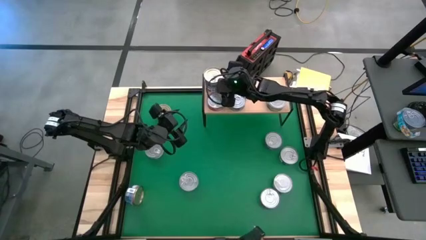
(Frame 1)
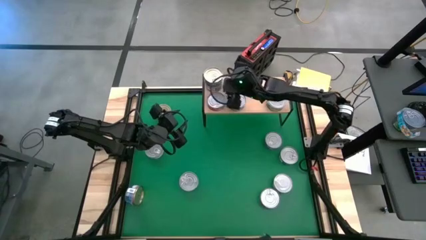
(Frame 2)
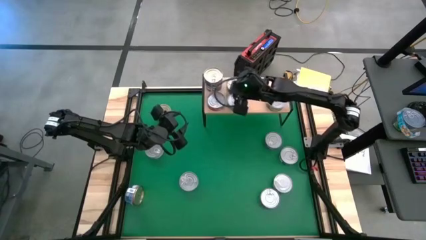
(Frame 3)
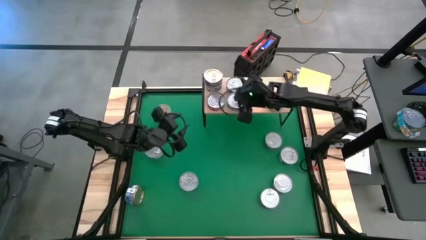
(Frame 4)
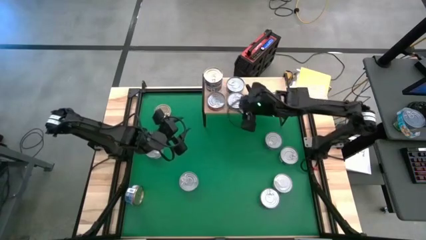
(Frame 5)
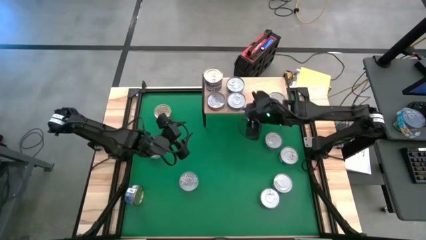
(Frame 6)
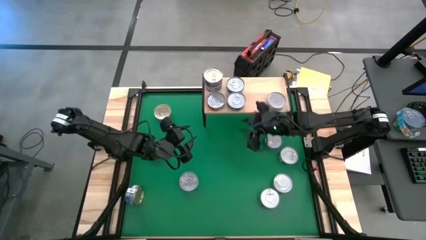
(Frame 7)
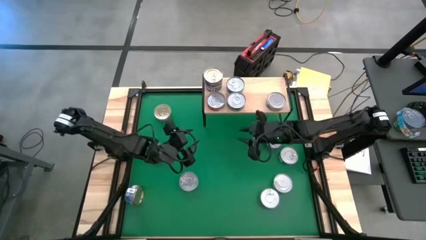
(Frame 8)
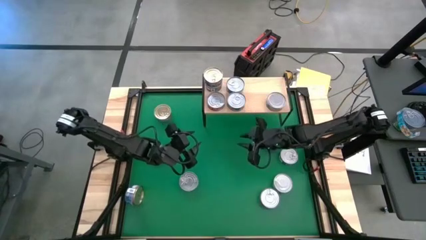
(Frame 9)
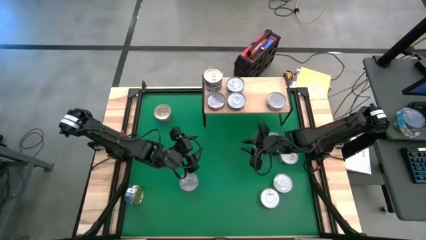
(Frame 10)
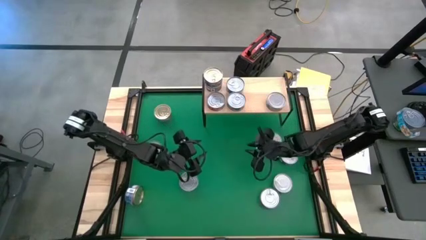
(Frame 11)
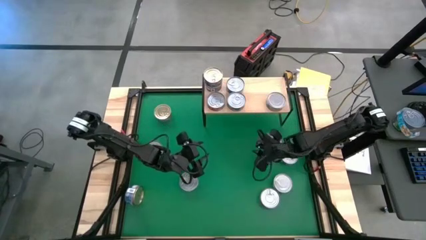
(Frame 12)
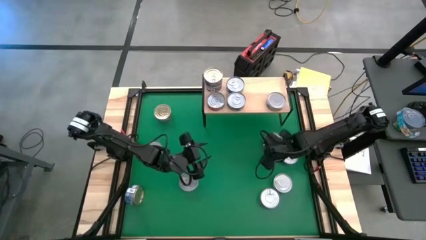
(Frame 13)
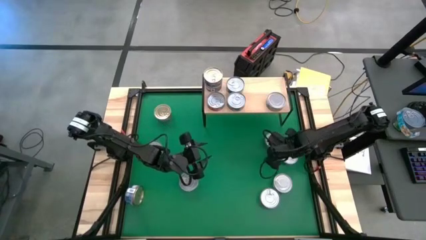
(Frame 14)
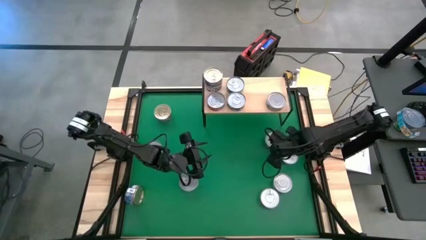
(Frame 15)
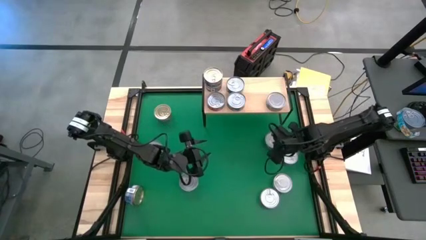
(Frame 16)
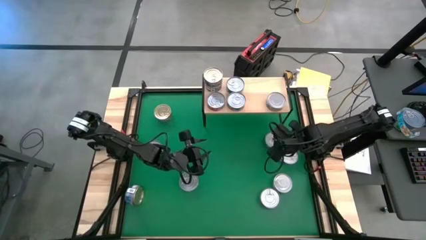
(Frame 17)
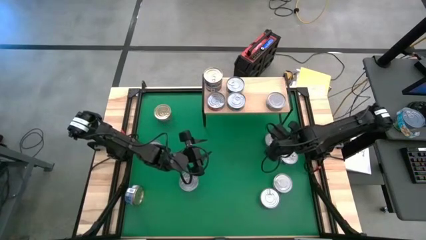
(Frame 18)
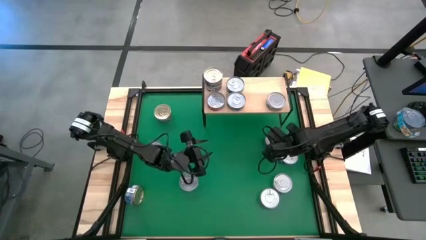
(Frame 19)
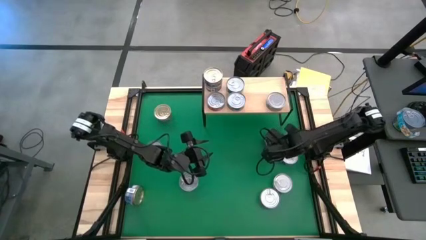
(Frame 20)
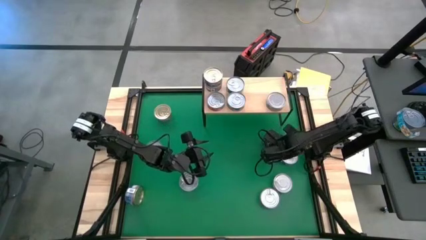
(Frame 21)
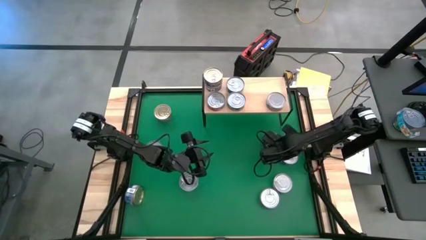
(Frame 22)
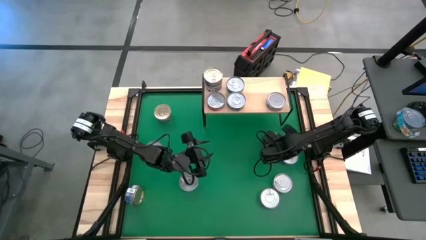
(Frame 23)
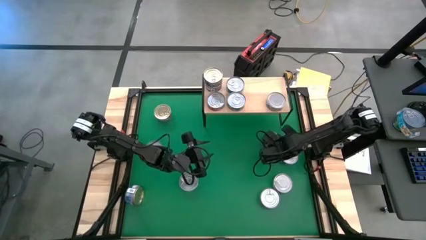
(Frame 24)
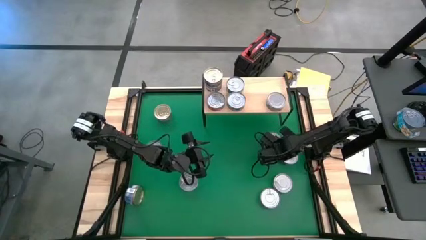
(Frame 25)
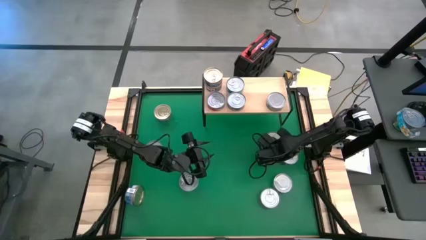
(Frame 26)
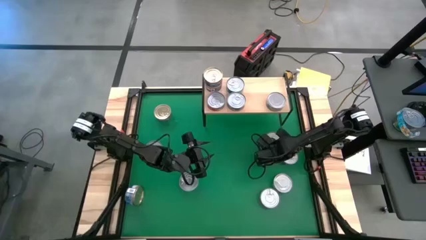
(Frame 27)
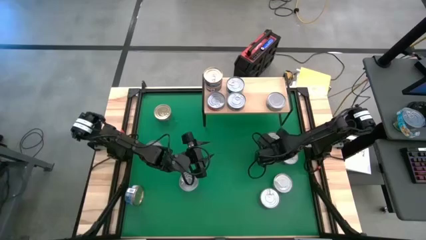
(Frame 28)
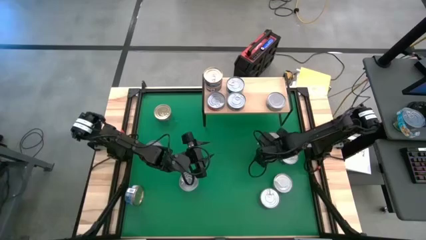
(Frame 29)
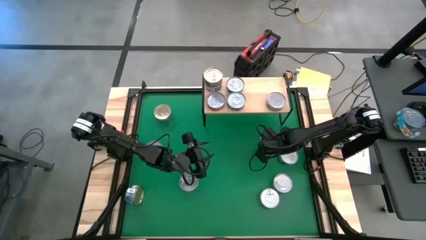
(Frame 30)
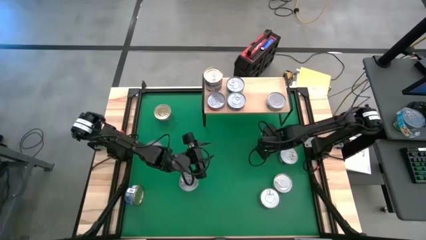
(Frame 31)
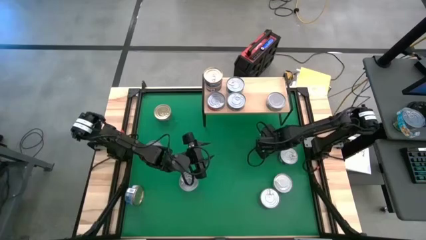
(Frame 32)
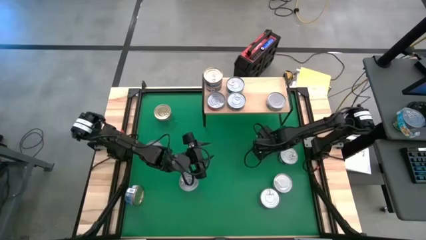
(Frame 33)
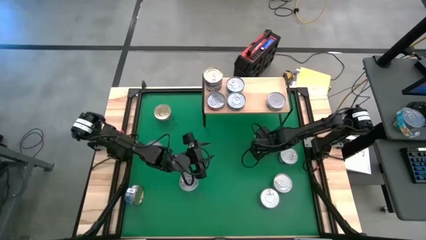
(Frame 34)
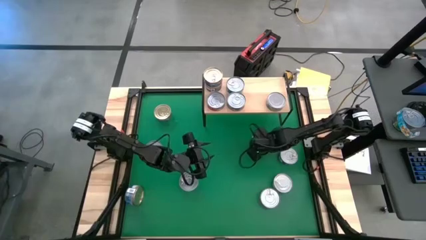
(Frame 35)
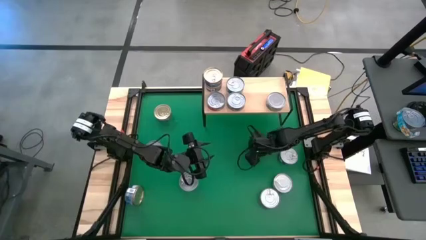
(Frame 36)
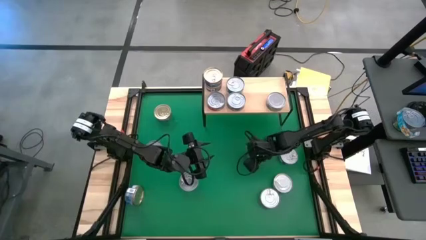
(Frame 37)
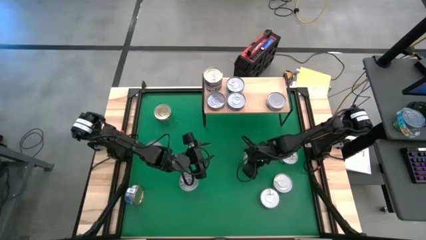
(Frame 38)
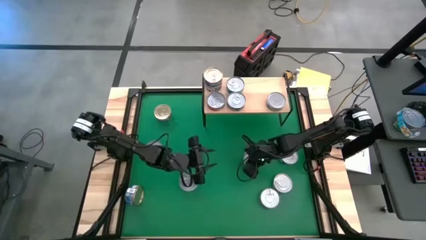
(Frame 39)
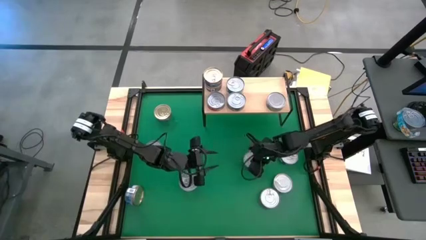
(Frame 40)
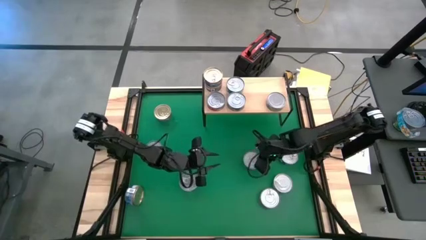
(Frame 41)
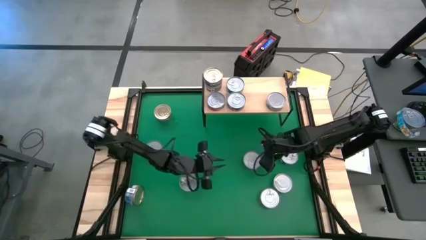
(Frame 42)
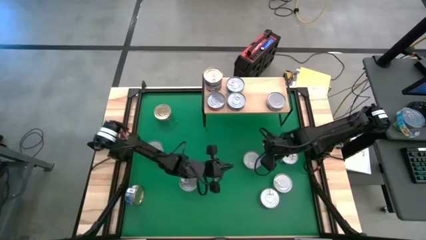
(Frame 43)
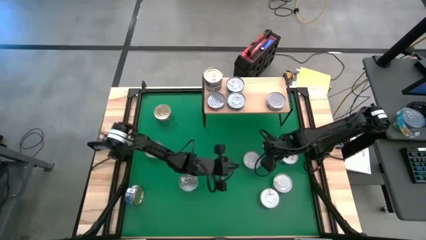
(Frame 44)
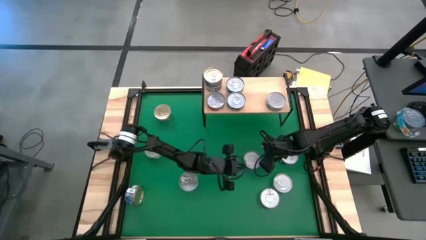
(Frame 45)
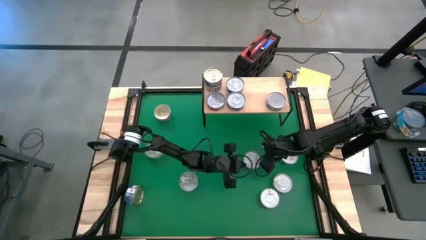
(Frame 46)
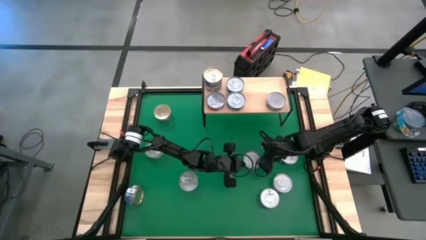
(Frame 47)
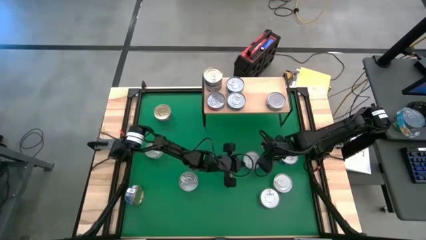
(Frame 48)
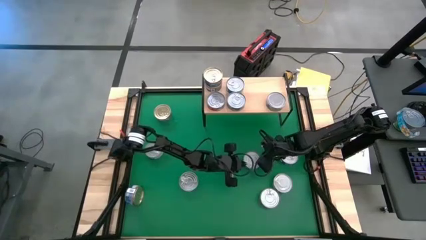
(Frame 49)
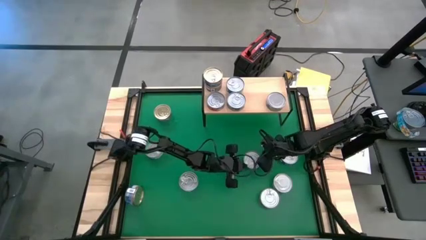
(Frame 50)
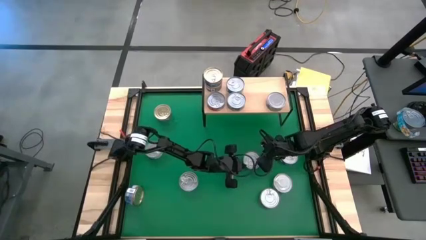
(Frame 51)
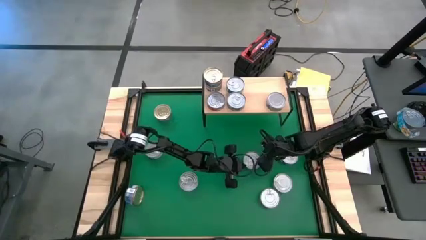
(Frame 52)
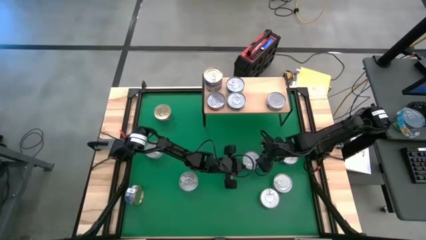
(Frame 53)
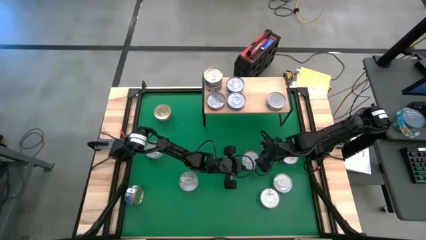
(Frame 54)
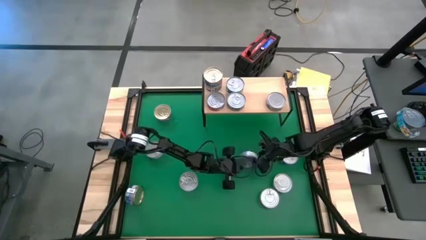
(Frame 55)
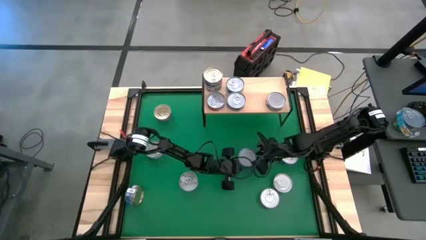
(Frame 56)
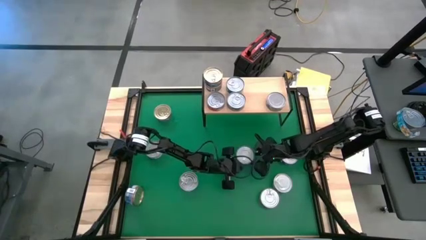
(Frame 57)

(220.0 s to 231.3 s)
Task: Stack canned seafood by type on shelf
Put the blue tuna can on the shelf
